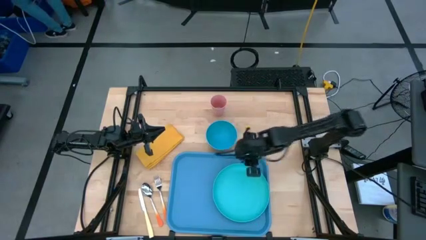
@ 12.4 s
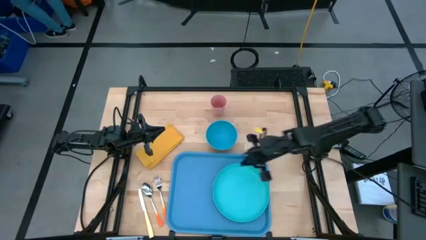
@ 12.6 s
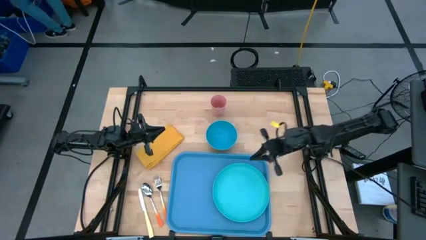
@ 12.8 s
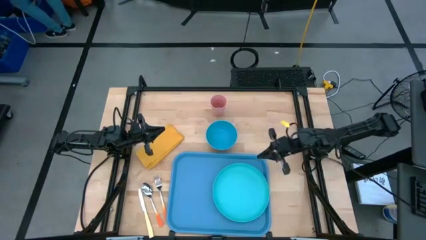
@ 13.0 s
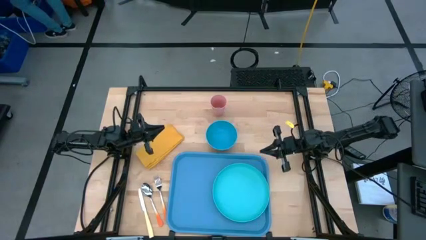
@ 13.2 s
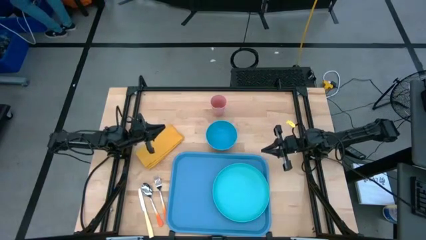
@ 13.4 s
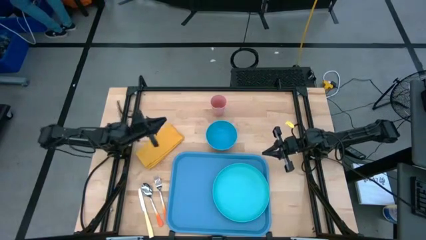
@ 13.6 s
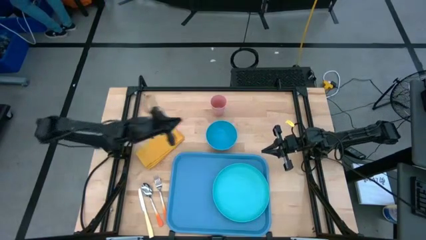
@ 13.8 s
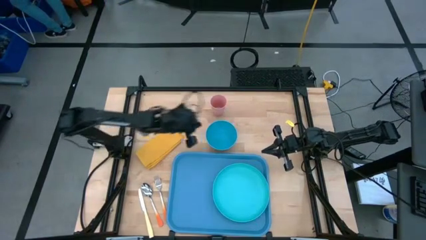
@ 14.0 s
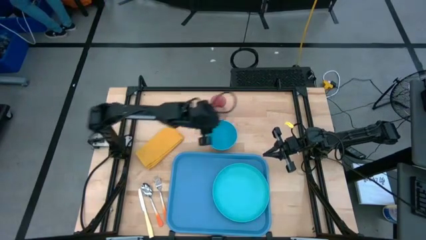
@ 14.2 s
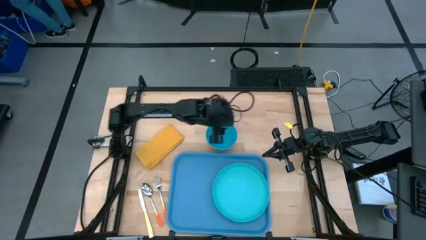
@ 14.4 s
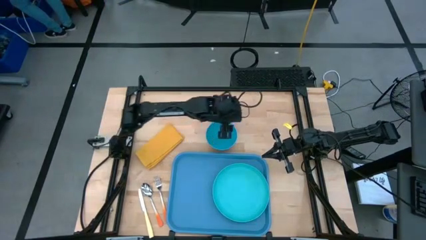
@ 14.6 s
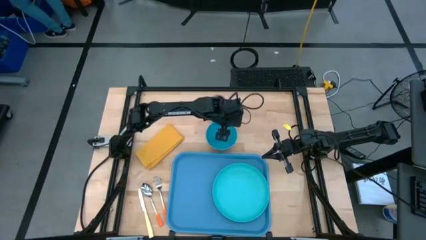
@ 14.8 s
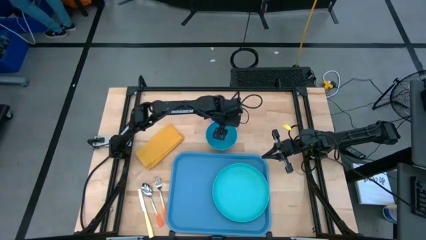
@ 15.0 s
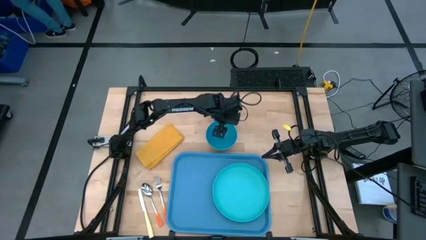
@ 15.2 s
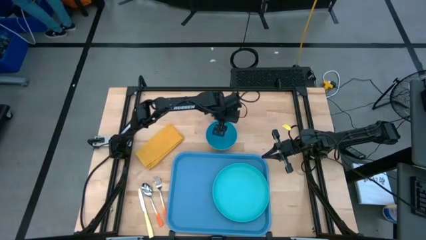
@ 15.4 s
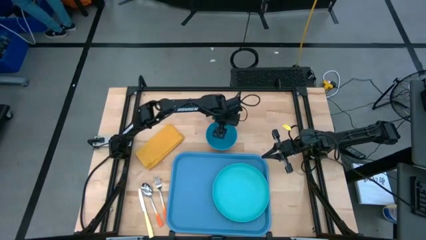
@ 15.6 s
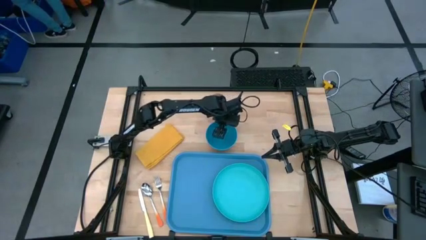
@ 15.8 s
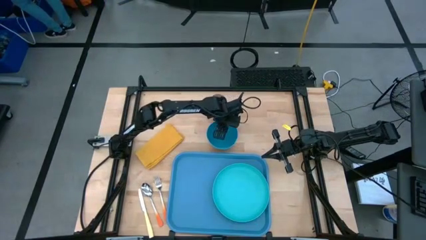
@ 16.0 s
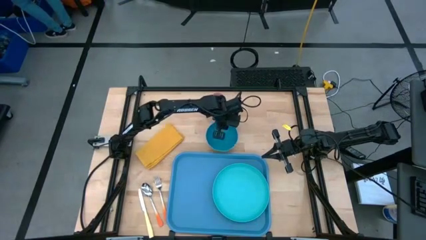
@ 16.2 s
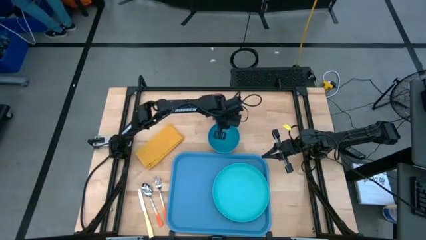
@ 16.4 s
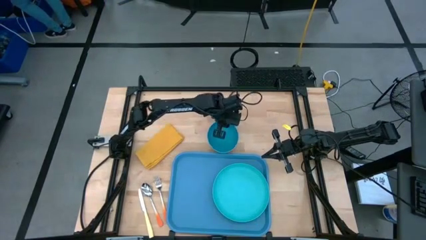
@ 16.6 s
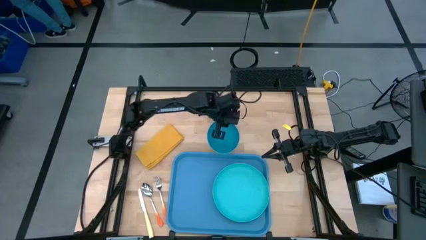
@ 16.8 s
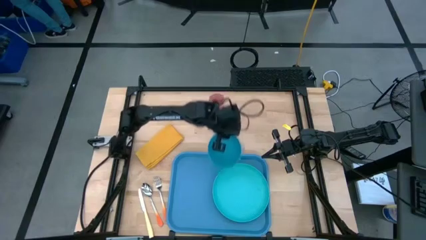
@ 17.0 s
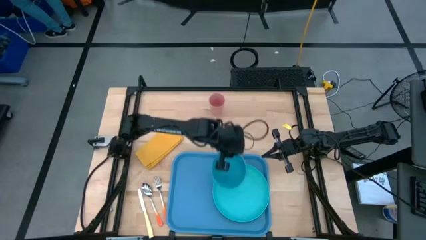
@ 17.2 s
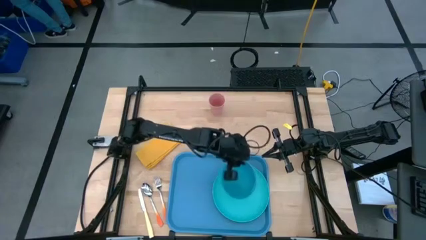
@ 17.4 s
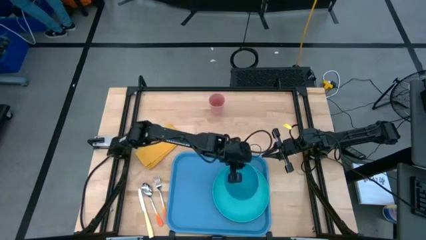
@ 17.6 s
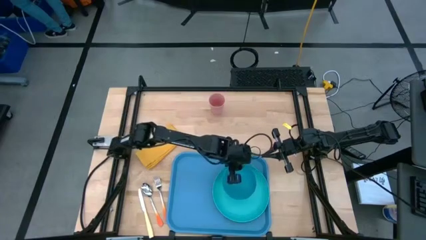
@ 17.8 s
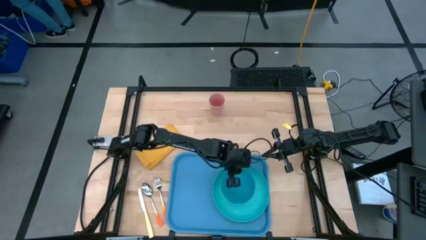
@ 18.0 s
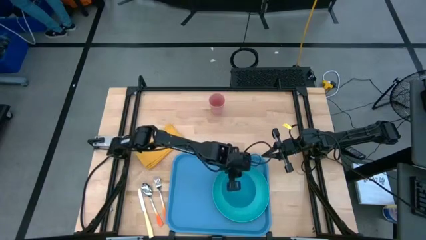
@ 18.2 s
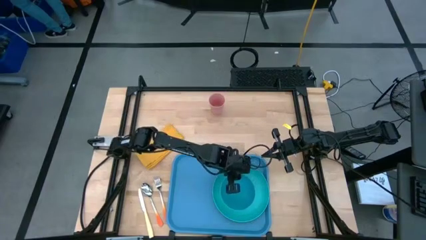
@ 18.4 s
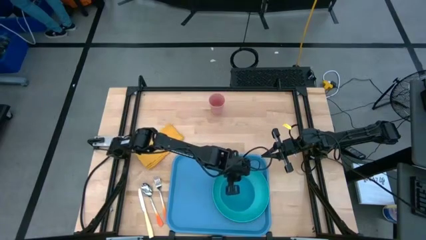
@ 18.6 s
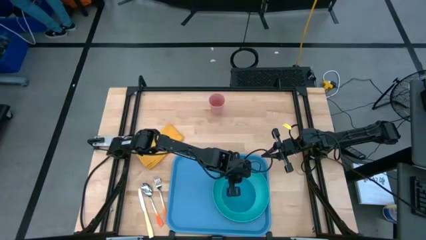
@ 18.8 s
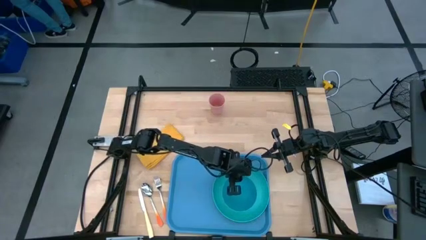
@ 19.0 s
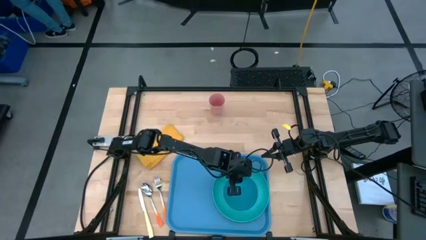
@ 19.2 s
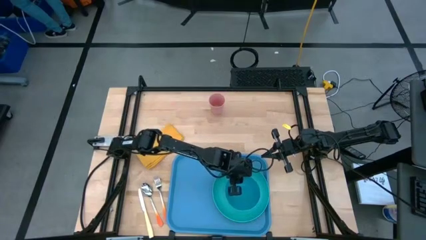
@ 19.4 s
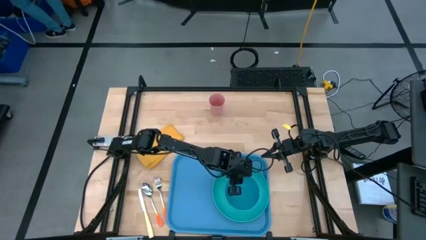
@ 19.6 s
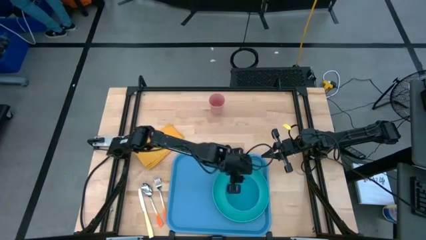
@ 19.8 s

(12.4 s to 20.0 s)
Task: Set up tray
Put the blue bowl on the light blue plate

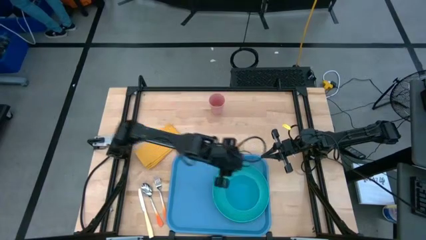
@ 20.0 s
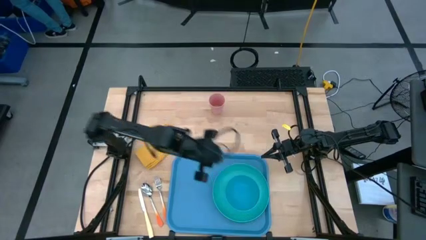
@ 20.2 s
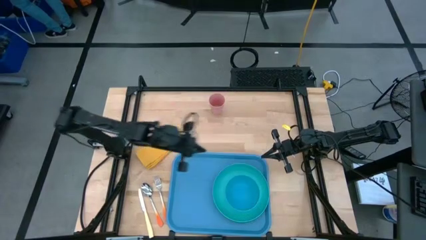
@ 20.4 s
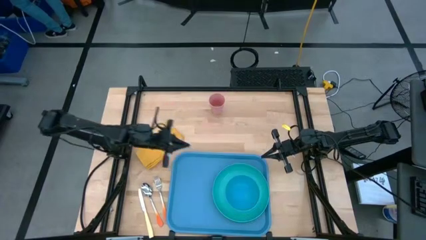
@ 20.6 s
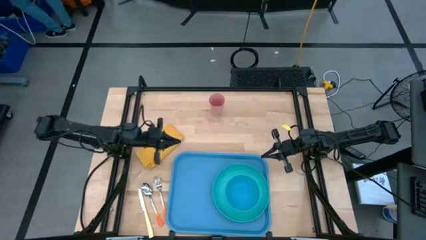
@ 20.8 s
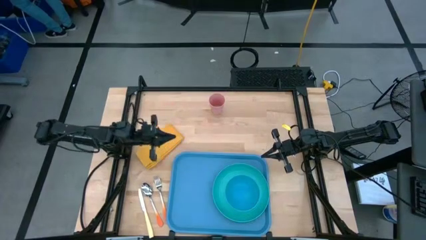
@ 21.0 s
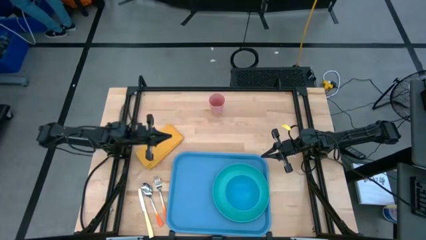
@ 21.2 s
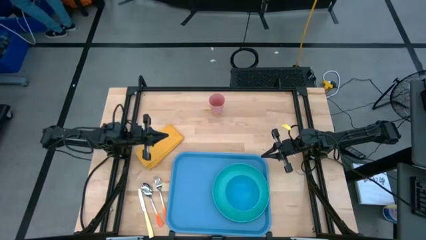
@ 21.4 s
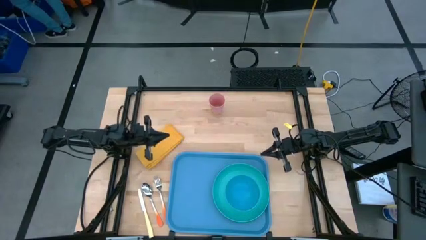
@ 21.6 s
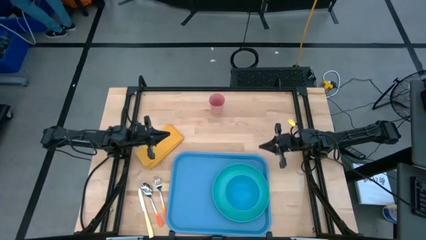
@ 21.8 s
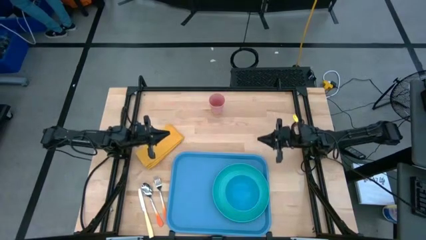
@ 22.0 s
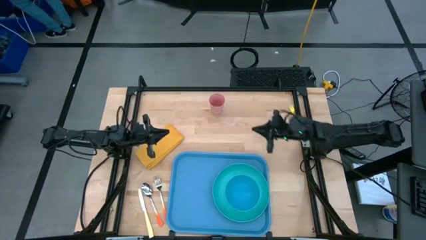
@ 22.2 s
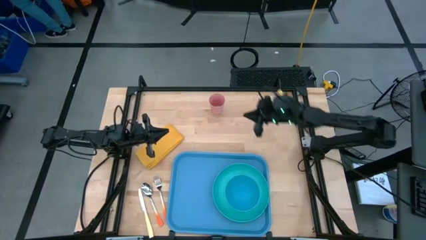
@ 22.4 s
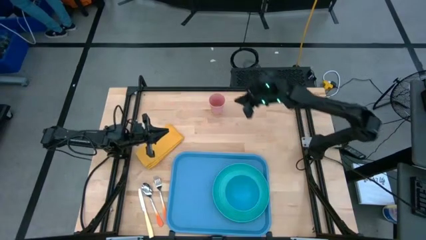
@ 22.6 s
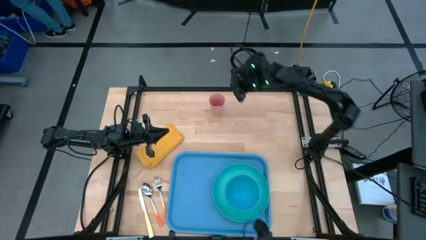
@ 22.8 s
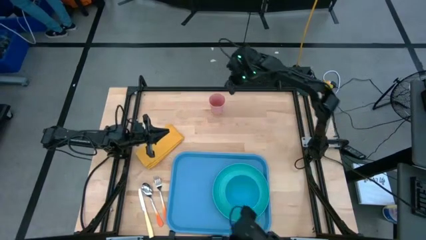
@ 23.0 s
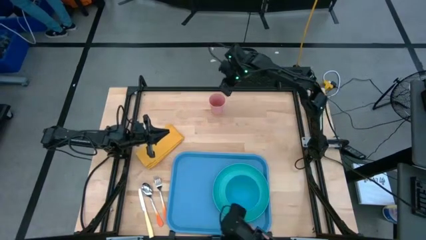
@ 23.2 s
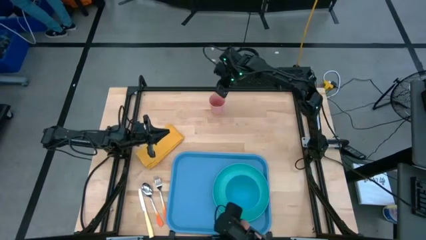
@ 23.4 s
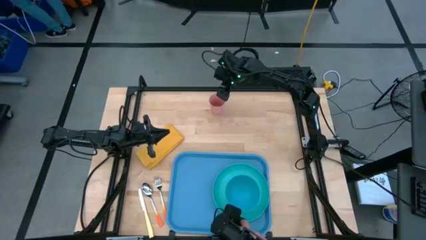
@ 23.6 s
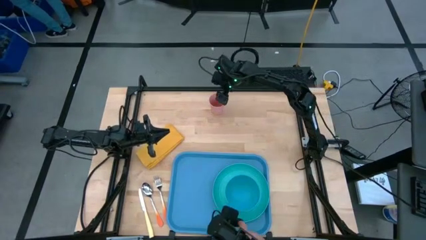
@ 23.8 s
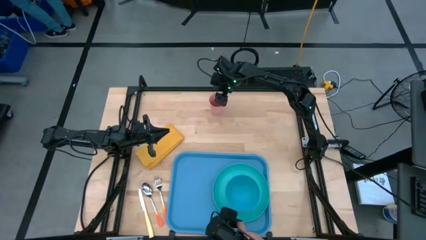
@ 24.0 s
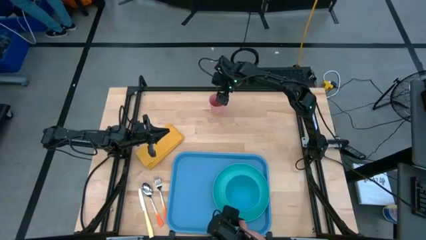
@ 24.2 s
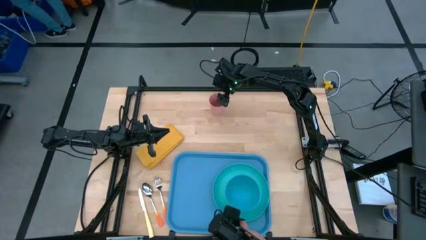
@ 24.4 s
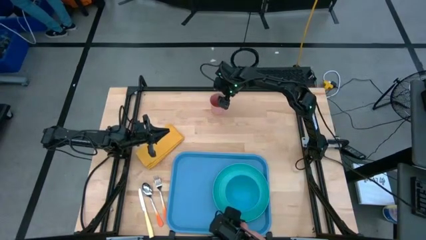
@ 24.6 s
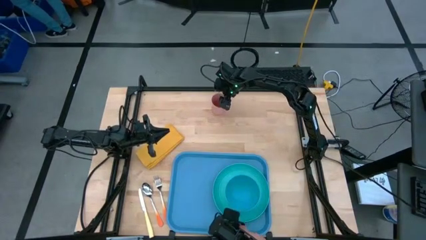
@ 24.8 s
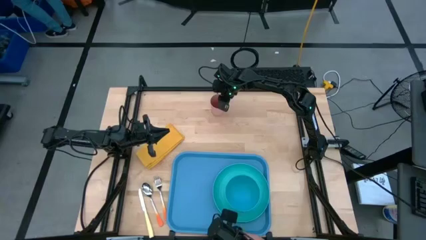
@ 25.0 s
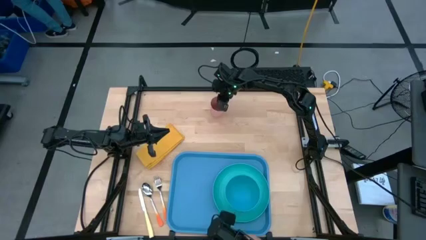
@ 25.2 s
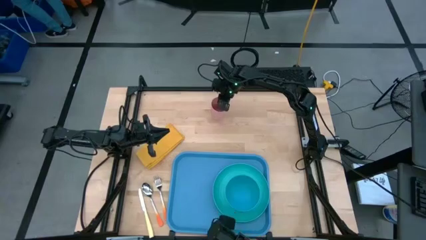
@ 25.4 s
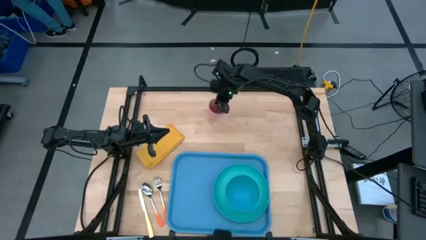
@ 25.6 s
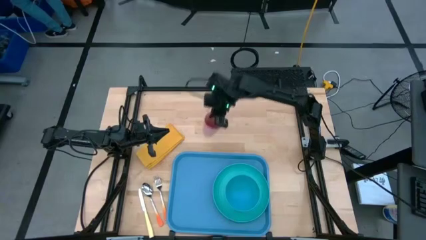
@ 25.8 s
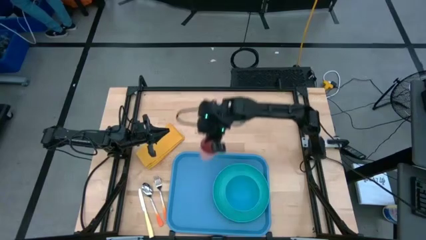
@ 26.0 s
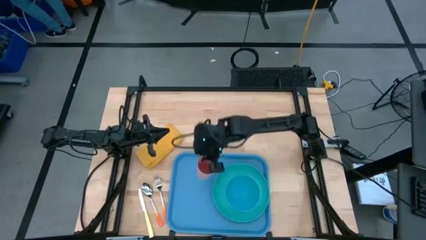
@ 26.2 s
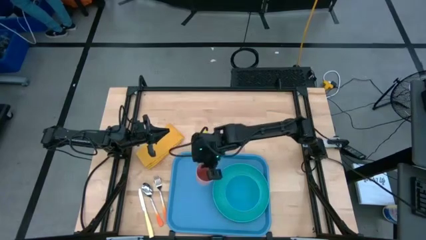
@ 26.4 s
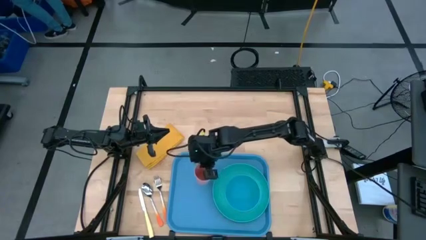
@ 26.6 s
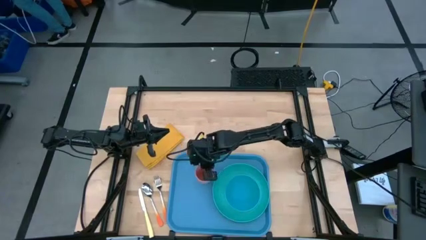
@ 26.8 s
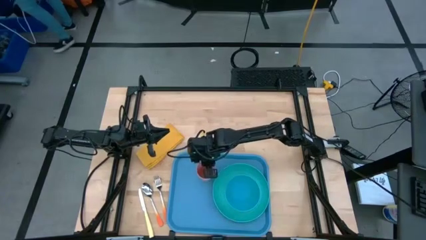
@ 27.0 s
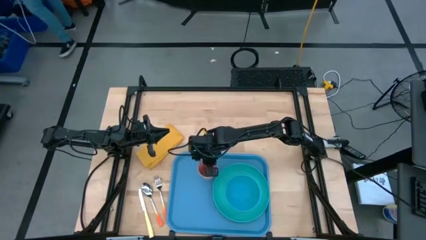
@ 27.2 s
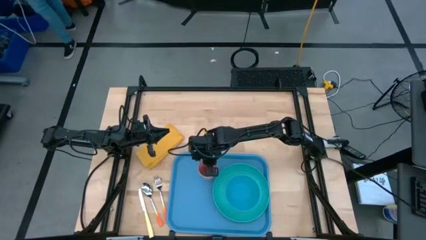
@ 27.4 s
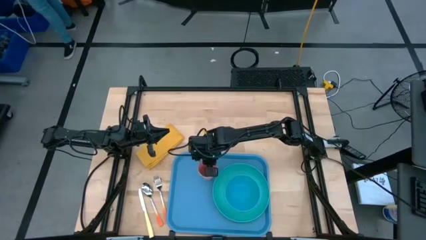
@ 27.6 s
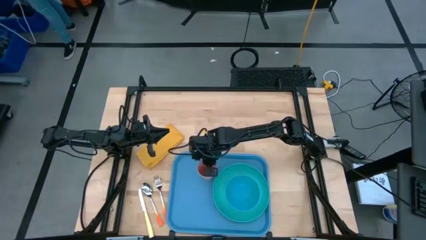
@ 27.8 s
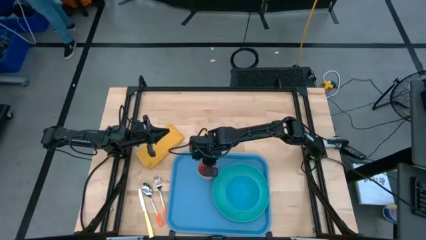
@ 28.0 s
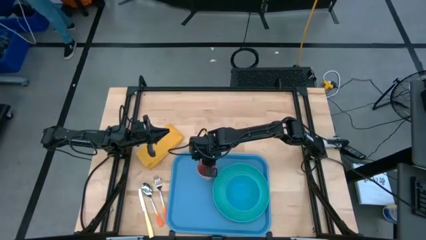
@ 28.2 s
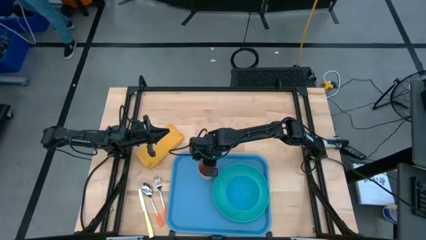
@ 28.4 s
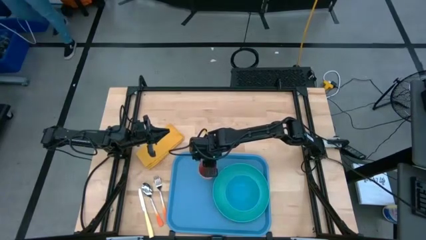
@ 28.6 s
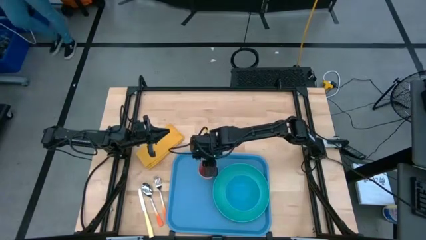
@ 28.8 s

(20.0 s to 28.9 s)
Put the pink cup on the blue tray
